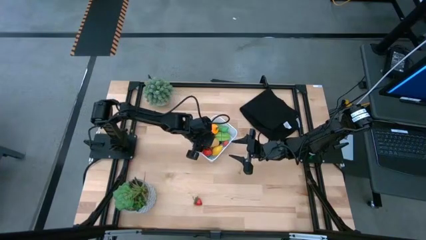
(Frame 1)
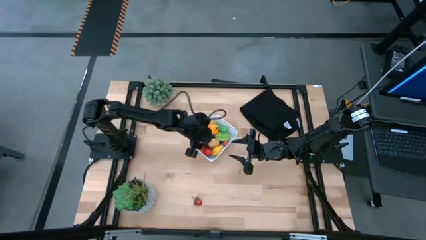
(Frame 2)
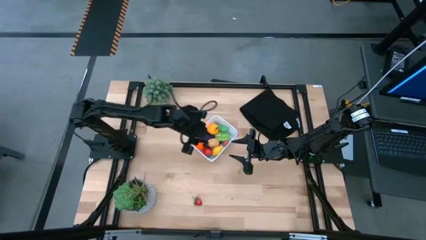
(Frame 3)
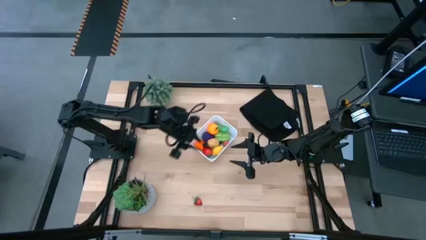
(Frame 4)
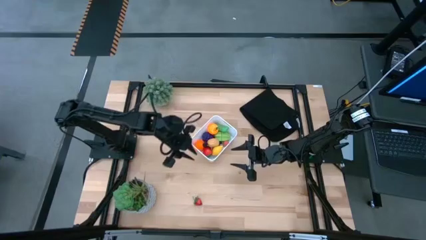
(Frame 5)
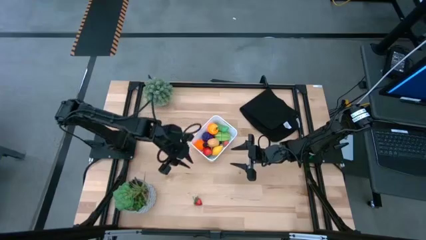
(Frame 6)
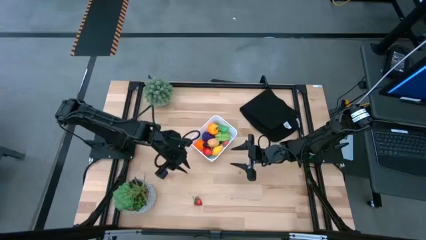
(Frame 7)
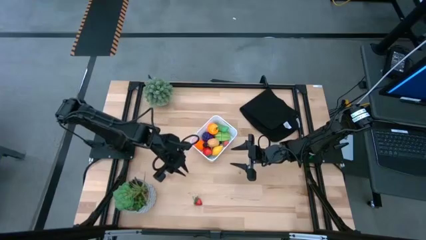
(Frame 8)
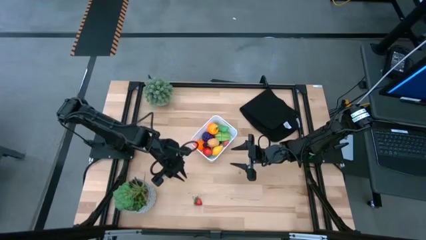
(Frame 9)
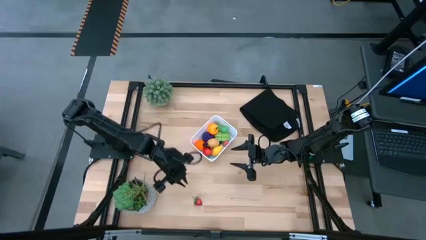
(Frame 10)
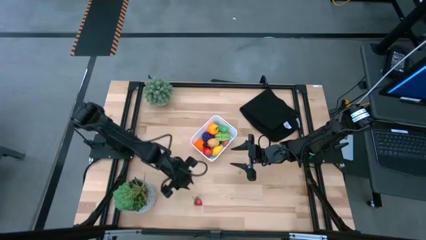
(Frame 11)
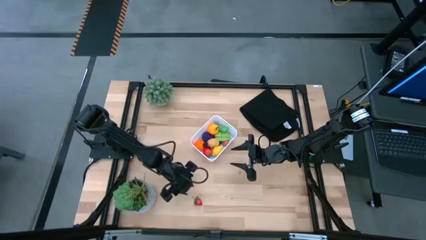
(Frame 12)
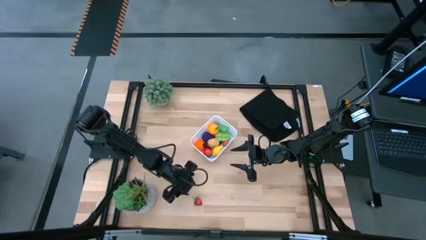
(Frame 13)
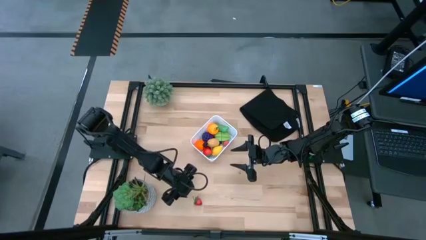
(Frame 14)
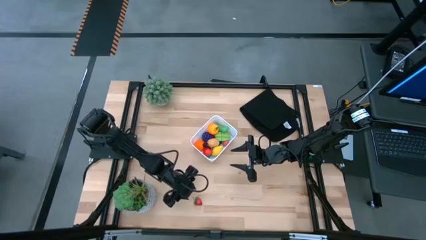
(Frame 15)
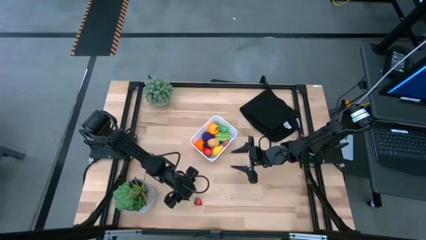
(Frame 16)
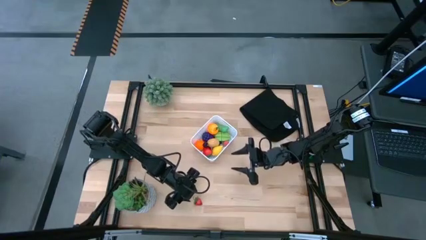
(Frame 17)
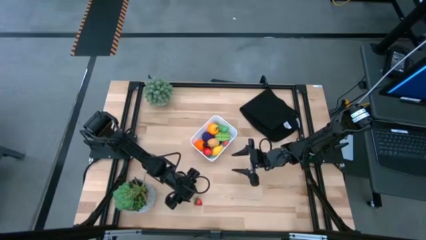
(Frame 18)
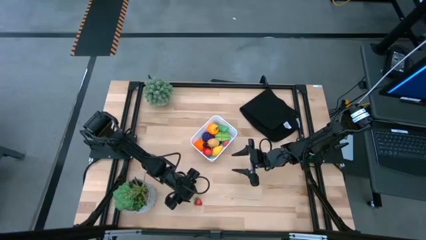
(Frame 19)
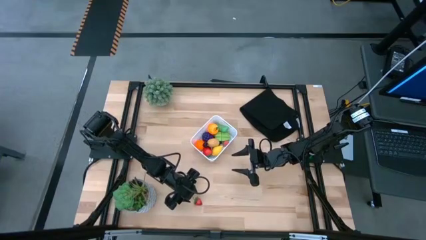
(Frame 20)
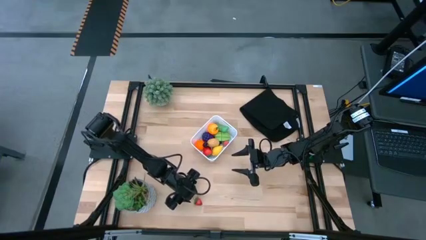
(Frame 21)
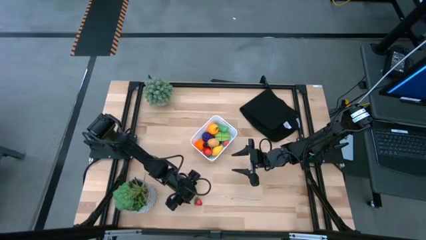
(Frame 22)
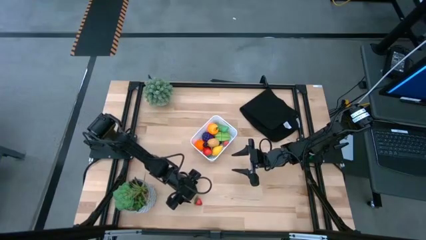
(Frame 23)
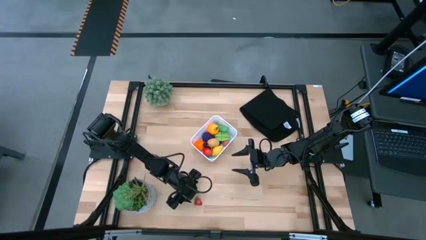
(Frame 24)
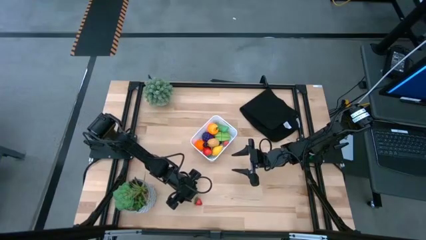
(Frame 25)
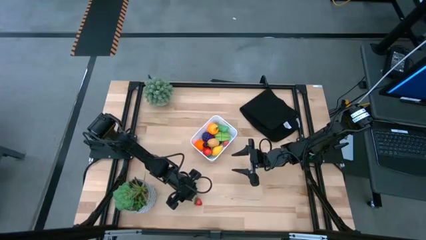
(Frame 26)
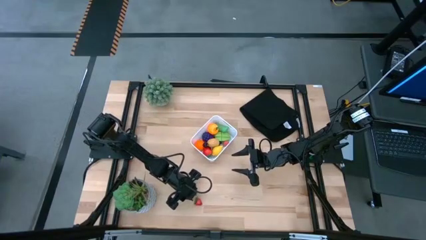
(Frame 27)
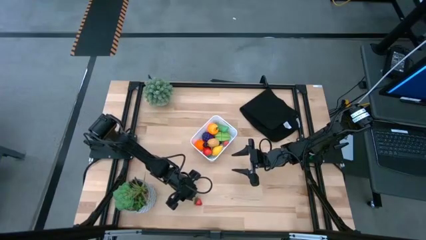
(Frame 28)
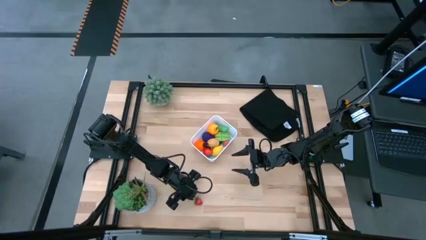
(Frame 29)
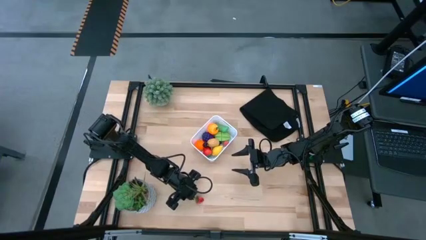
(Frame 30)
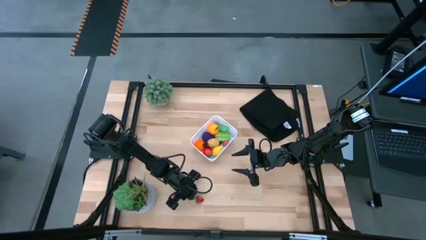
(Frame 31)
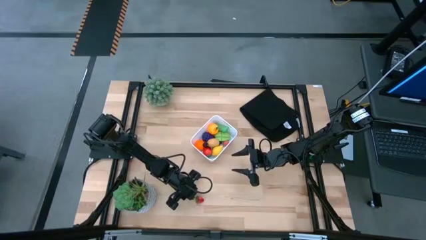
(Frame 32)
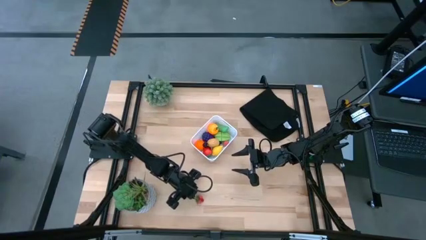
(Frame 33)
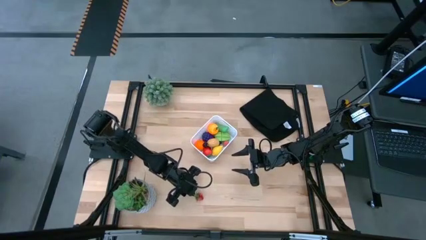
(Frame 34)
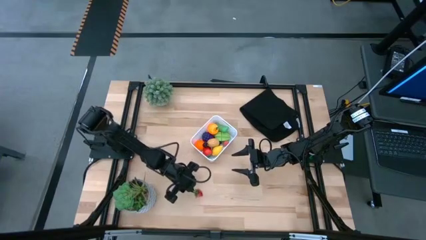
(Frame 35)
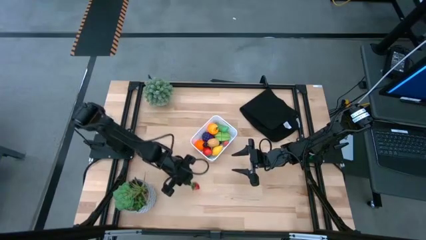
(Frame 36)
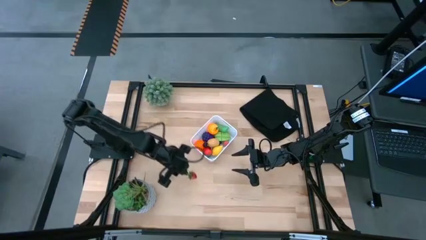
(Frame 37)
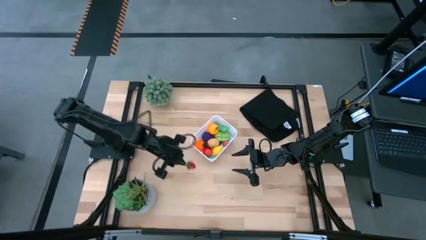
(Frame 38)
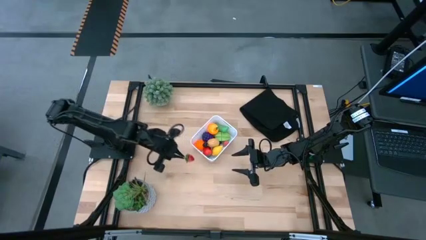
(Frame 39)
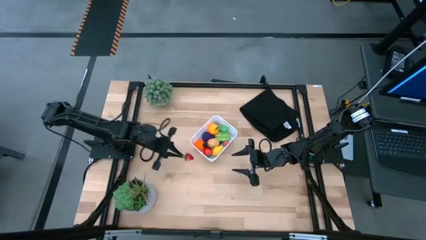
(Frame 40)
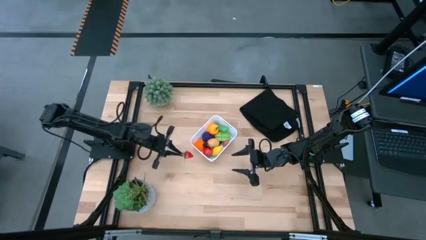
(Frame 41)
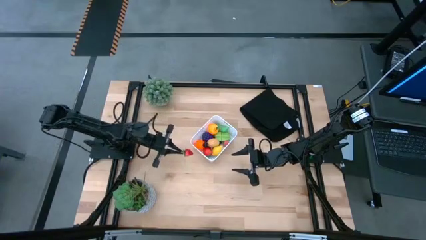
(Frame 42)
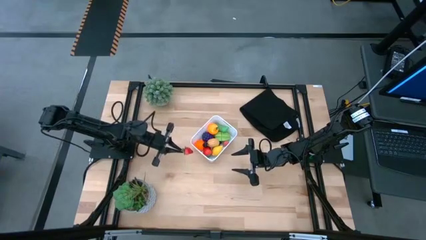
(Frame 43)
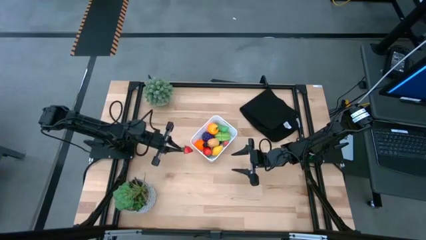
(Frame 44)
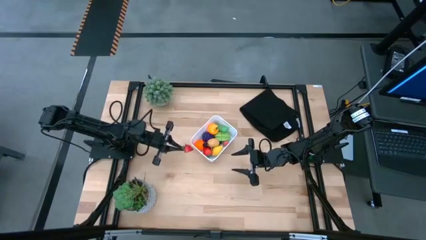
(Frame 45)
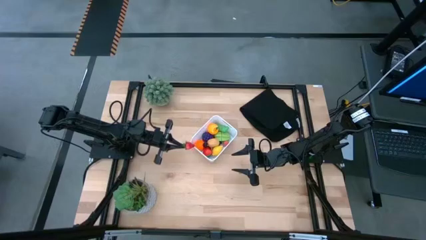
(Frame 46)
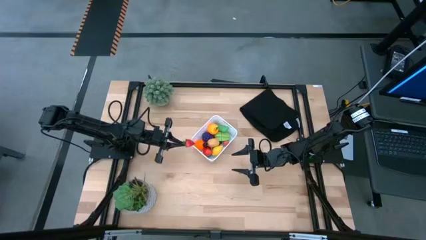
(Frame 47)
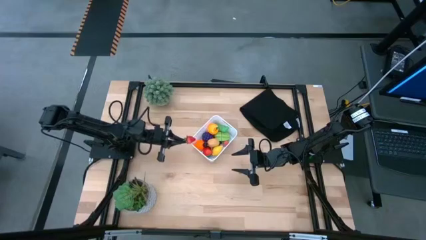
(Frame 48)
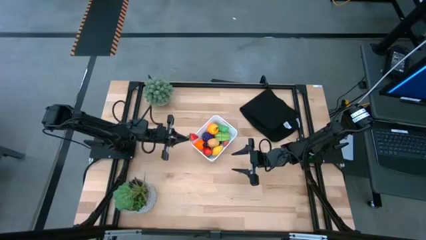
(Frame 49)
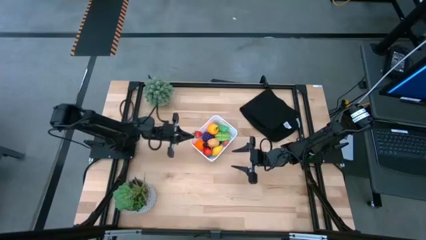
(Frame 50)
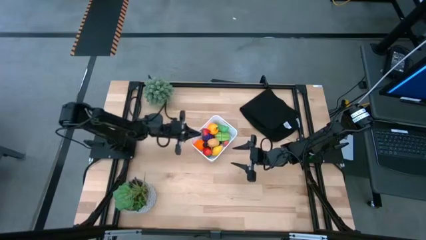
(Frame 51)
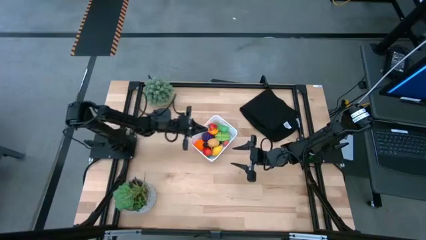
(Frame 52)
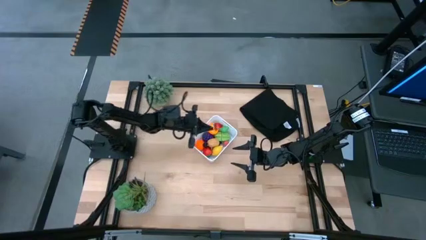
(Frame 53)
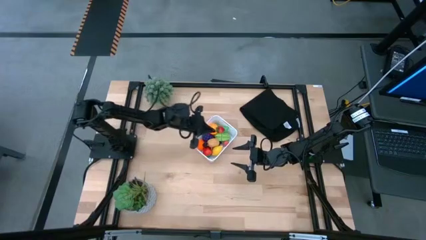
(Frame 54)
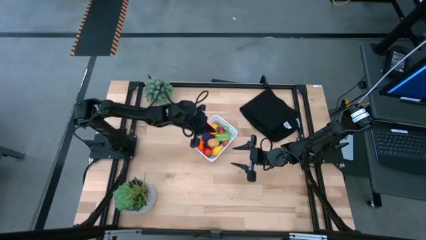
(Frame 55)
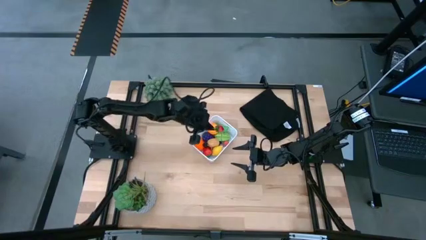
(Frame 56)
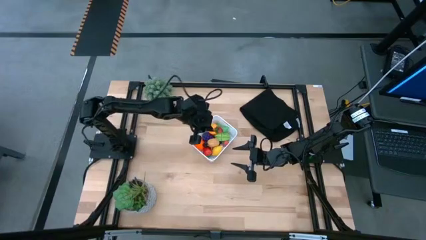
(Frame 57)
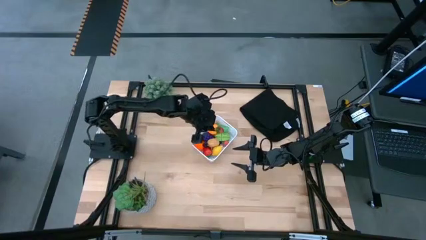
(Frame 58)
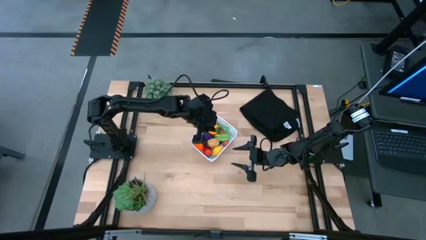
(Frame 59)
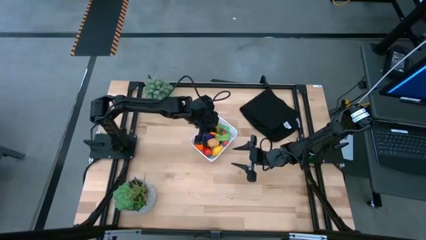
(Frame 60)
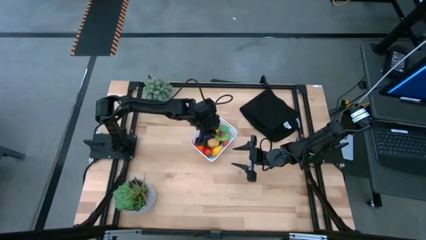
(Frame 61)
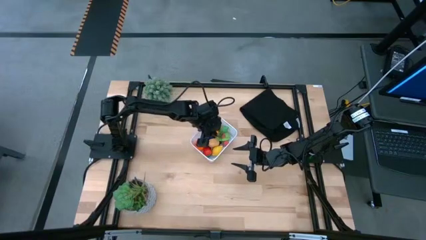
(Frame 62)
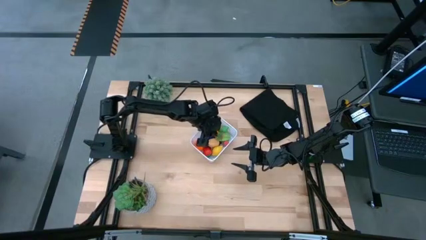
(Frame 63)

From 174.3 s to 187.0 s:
Task: Pick and placing Produce into tupperware
Put the strawberry into the white bin

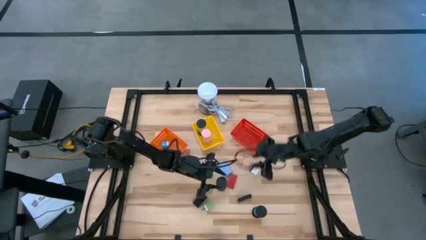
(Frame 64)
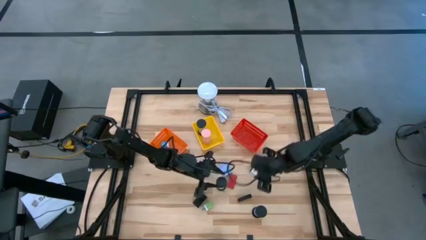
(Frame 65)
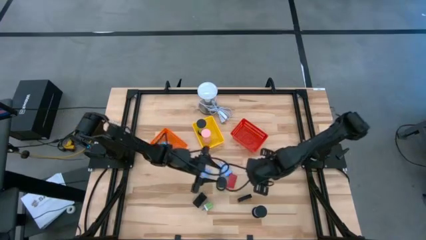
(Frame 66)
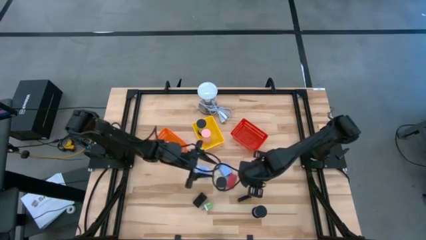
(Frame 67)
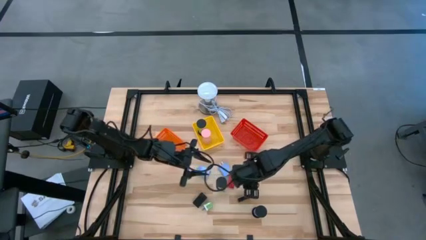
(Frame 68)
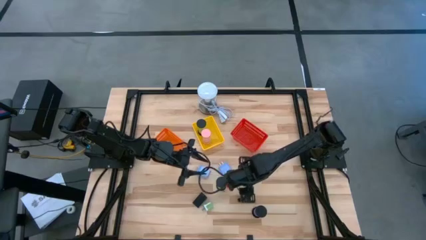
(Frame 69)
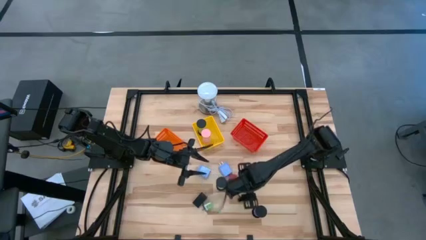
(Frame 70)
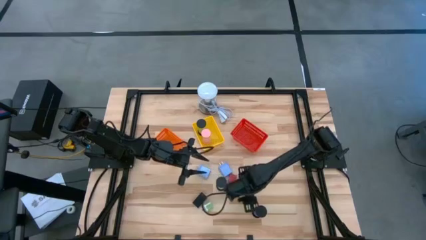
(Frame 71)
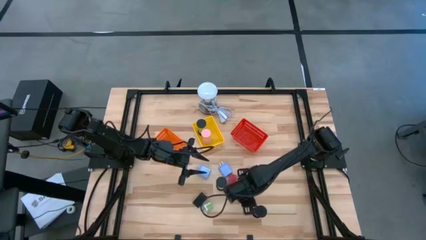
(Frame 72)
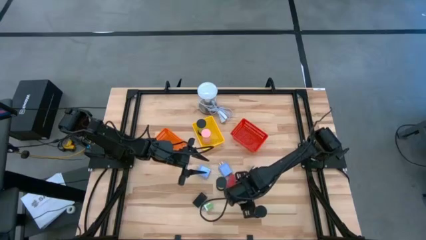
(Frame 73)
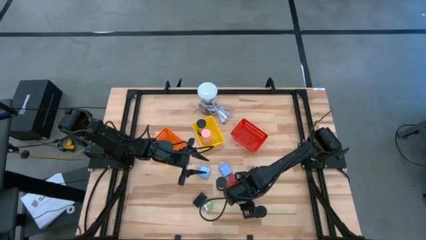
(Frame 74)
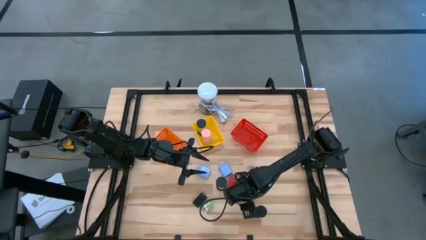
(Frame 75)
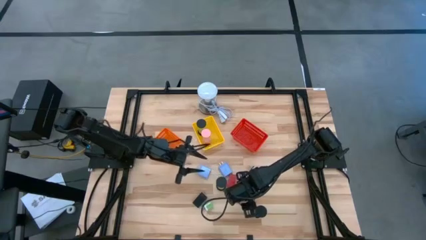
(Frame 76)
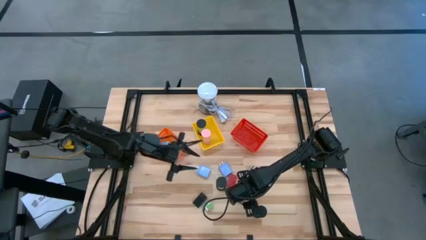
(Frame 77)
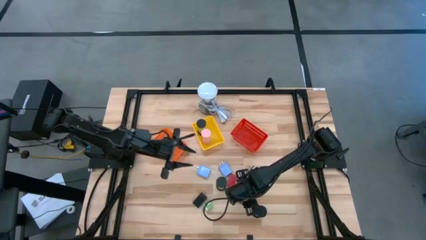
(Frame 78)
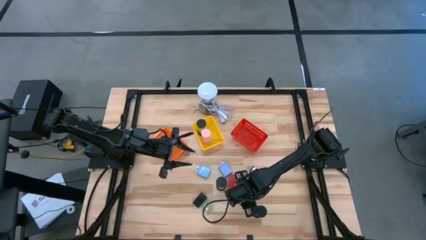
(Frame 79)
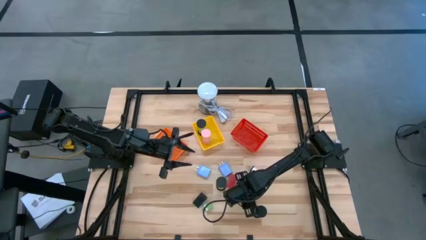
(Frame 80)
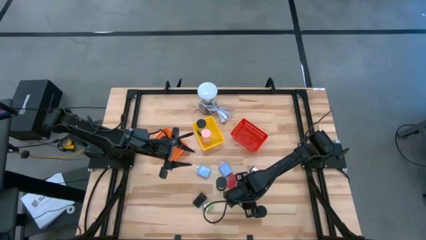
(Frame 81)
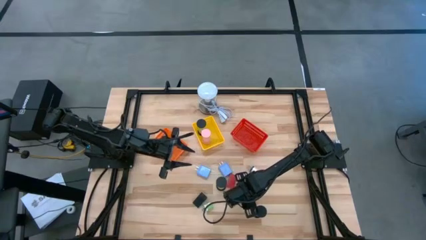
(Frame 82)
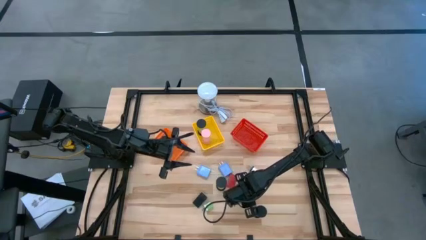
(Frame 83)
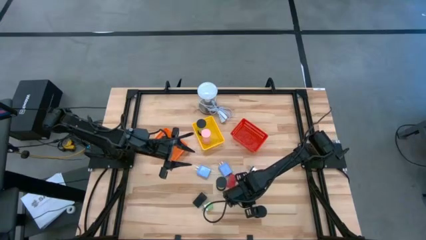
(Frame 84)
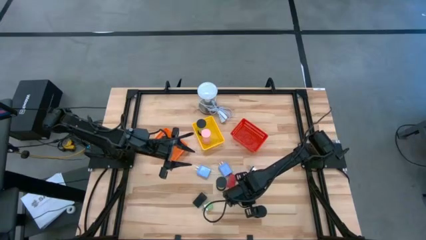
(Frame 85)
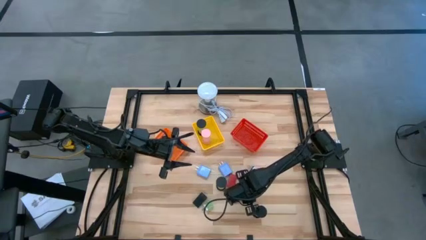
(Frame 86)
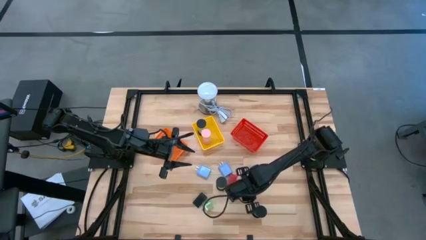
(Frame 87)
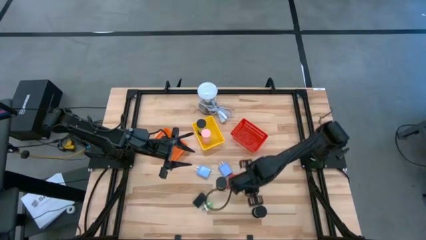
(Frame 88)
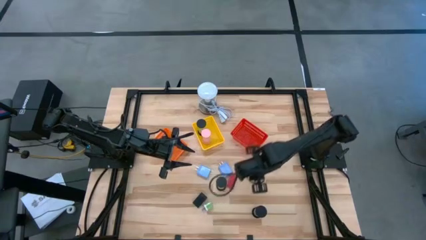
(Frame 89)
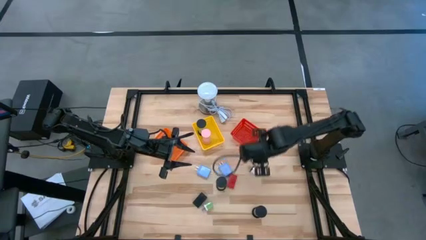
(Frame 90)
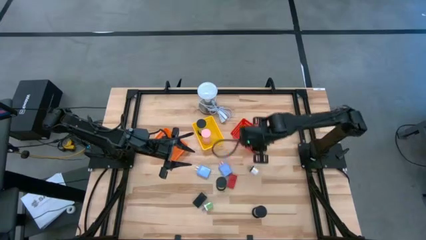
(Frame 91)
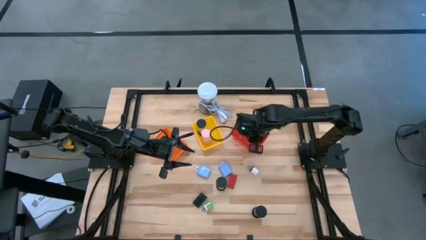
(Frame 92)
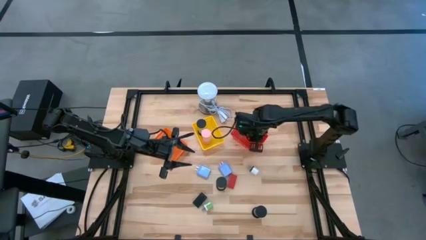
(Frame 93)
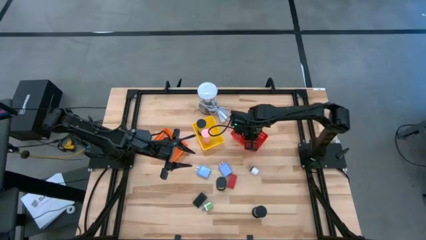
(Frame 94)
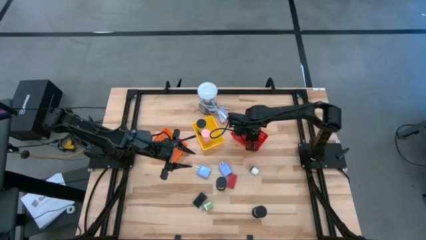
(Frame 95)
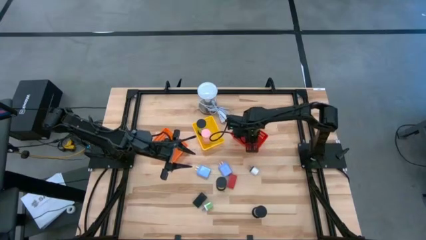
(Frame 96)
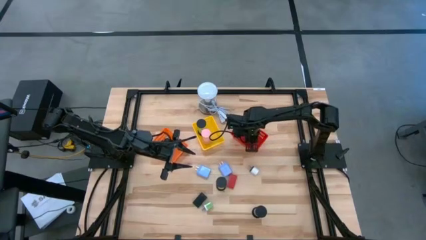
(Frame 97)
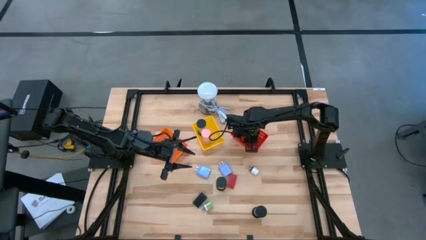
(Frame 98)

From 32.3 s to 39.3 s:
Task: Pick & Place Office items
Put the right black digital clock into the red basket
